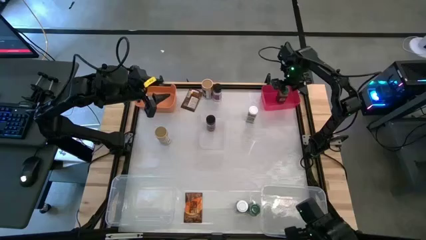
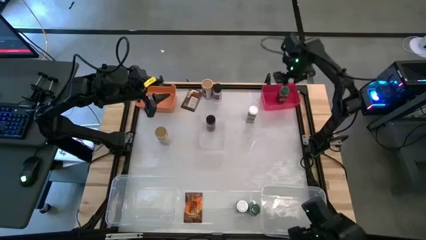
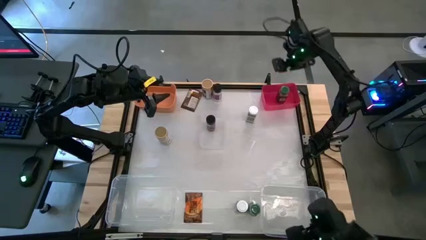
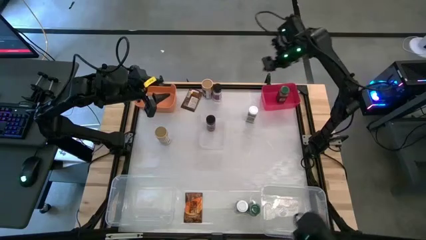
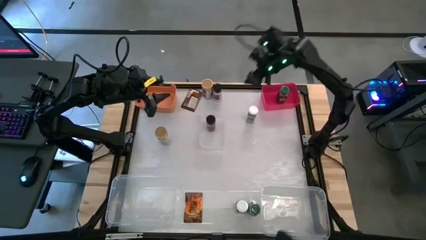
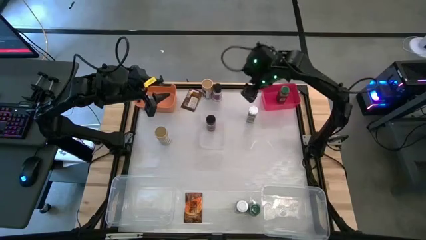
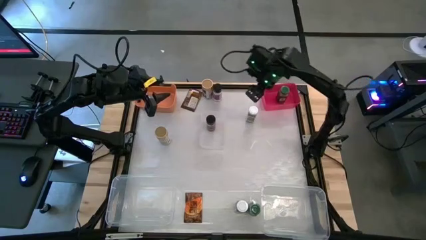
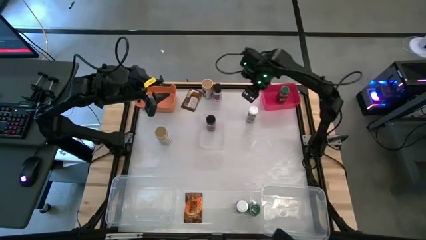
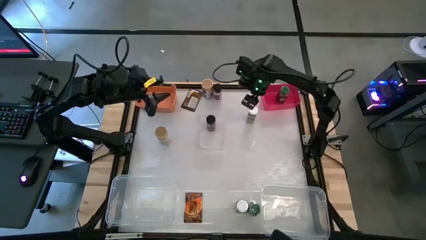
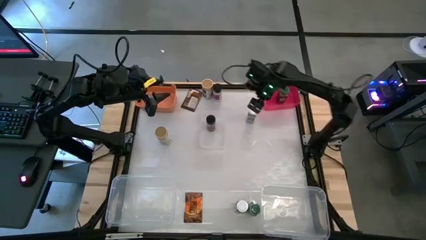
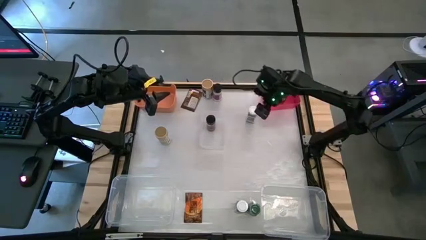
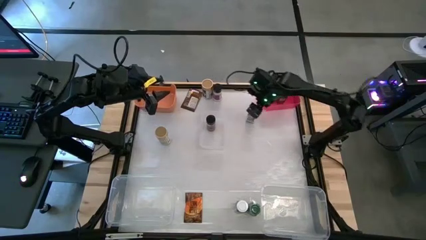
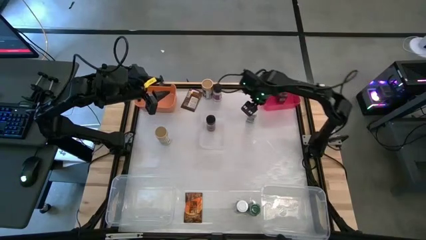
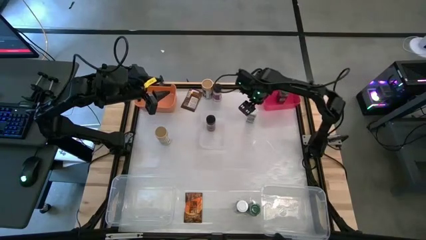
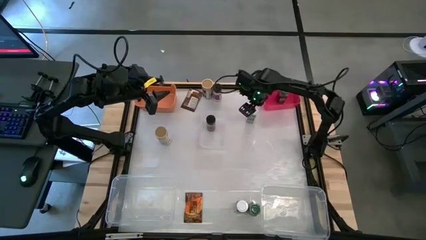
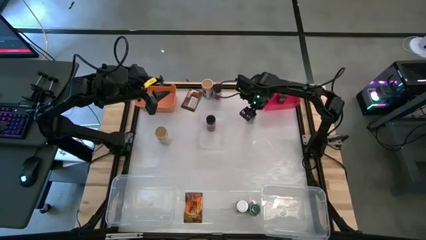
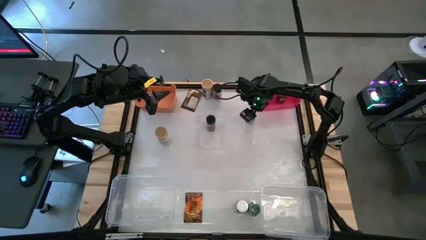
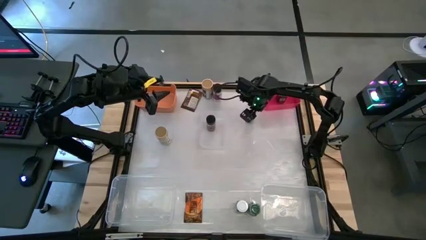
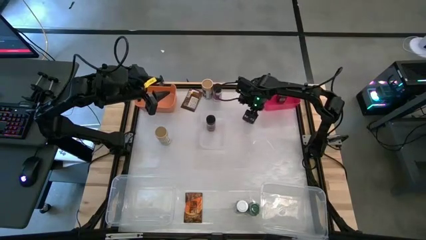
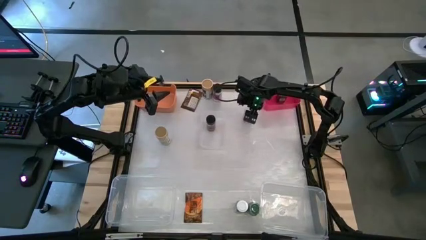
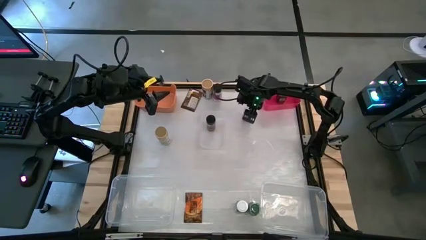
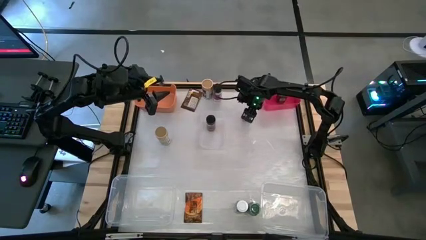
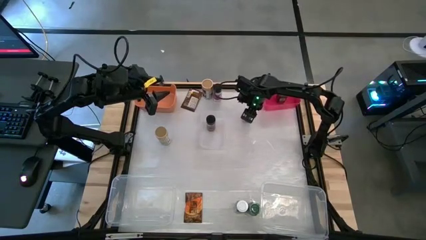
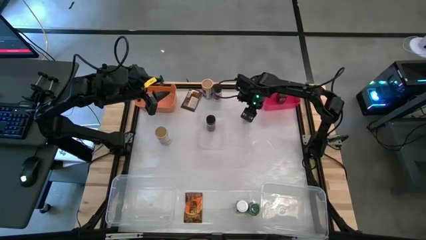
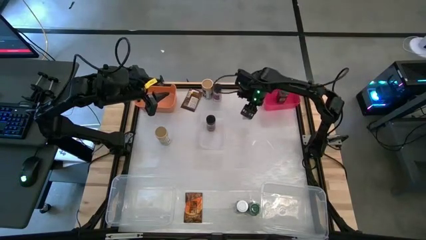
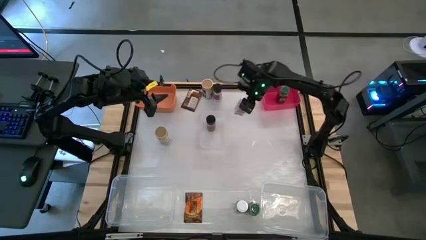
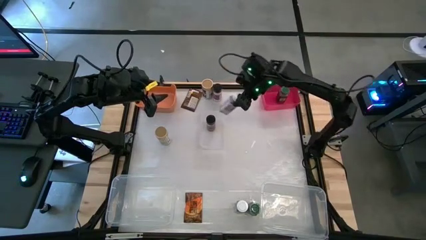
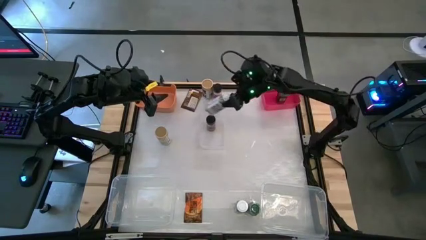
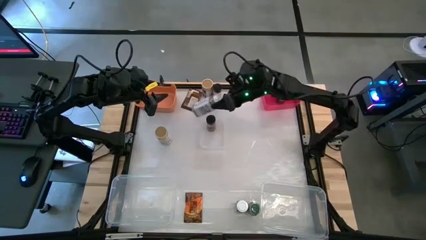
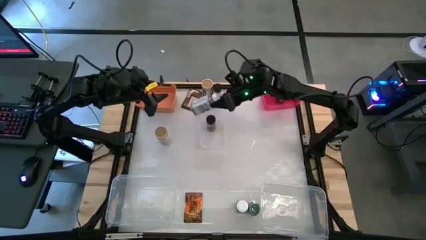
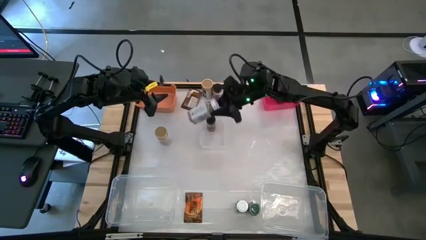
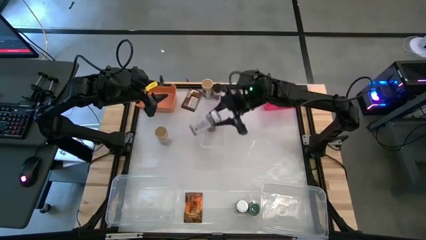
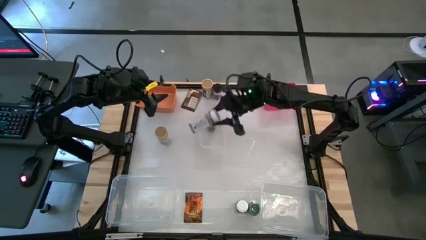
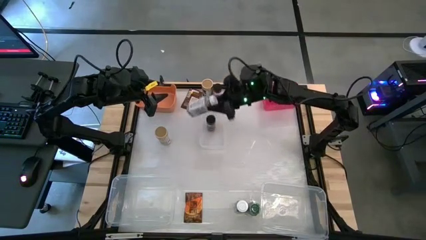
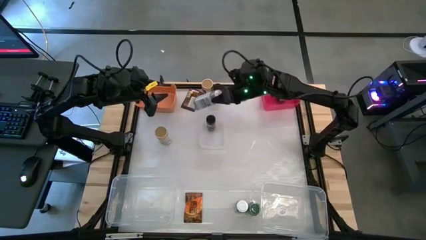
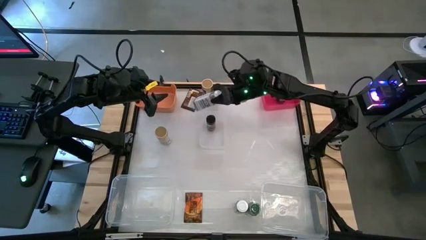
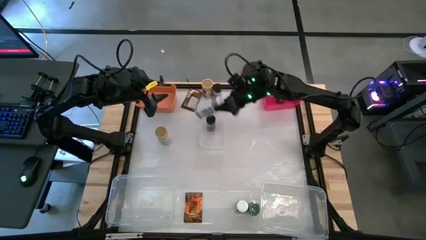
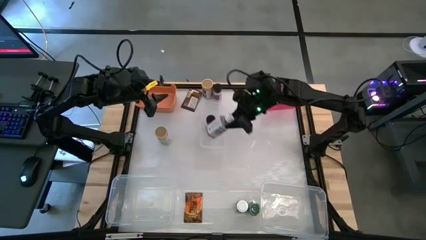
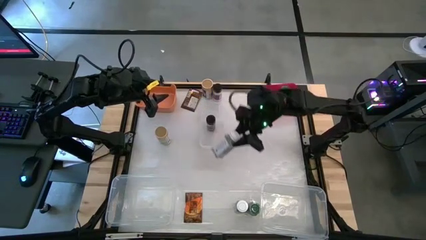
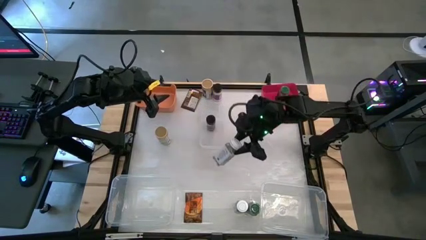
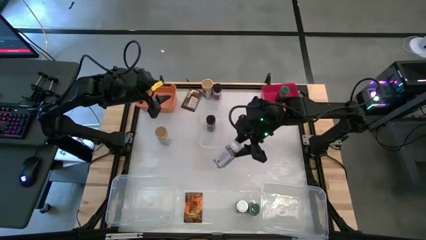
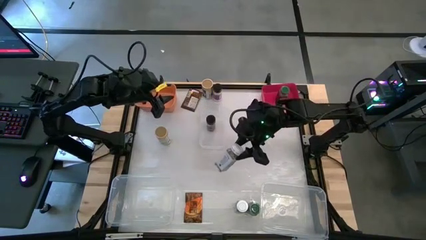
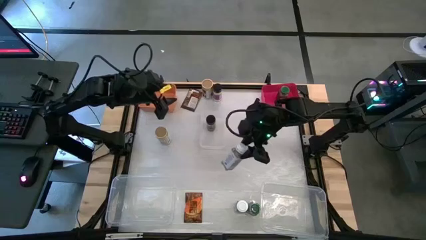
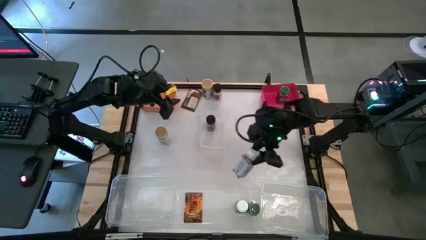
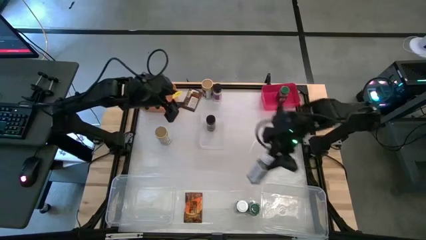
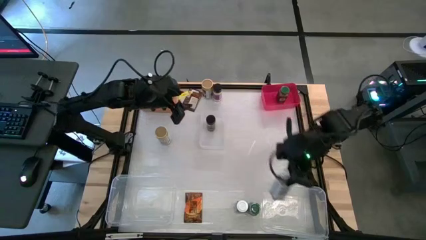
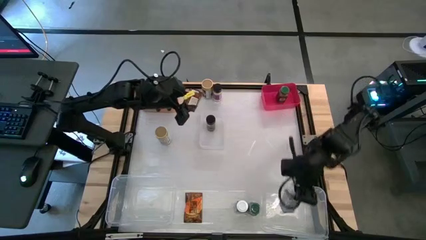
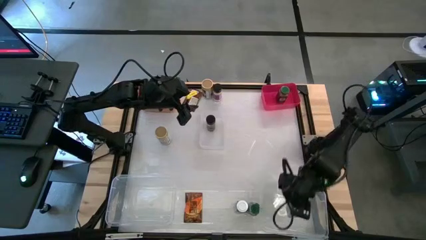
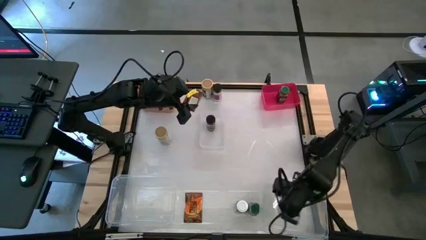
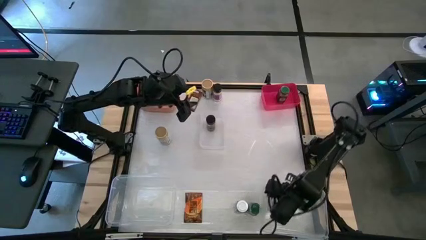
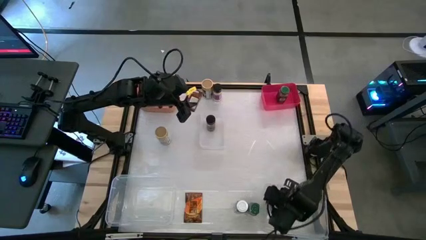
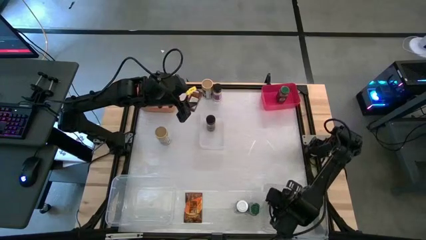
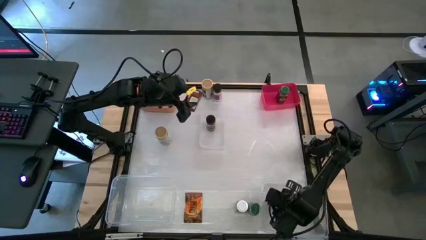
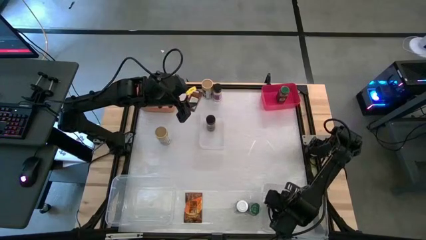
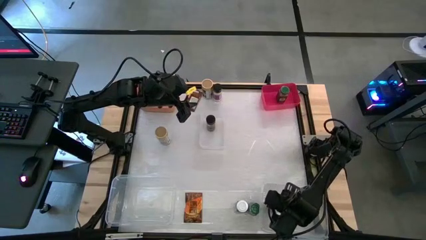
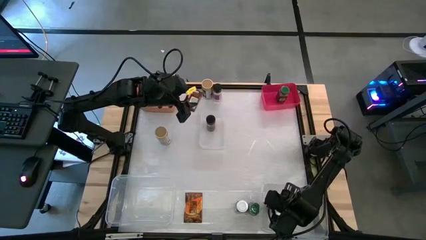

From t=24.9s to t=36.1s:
Task: Sort spices by type
Put the top white seasoning bottle into the right transparent bin

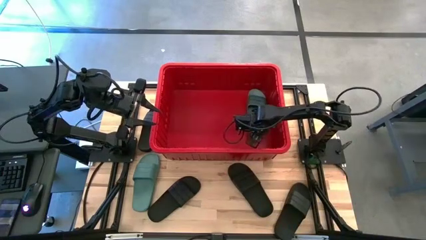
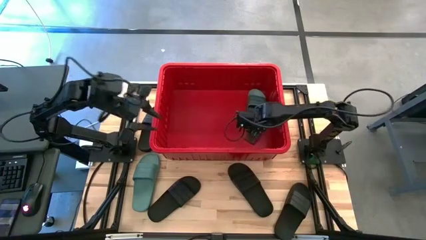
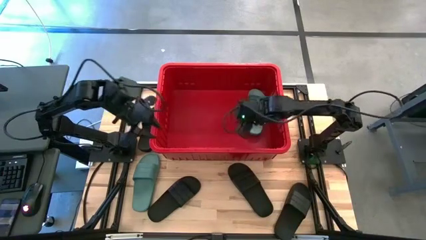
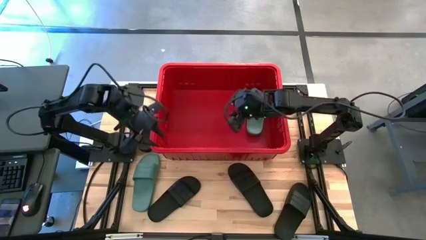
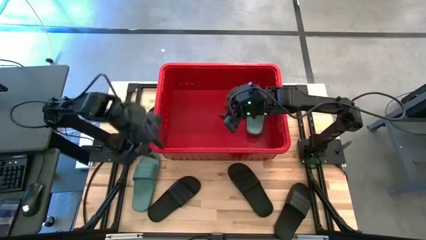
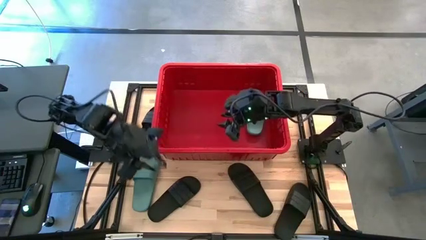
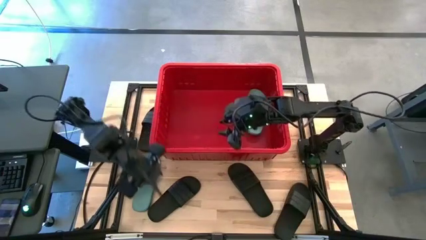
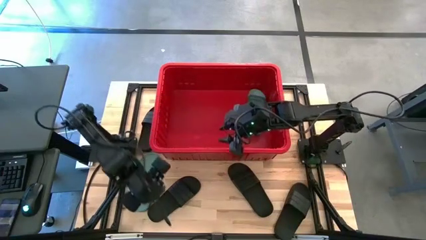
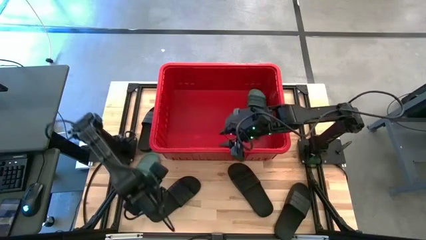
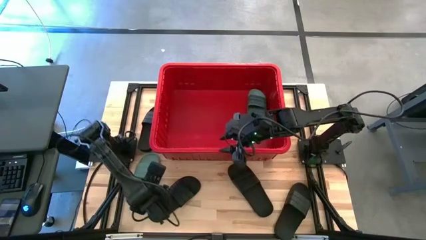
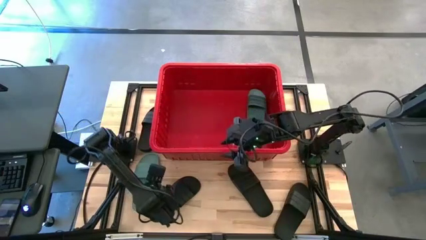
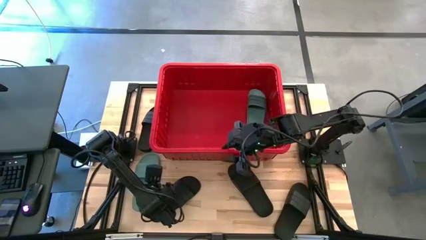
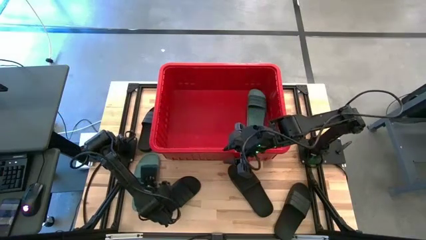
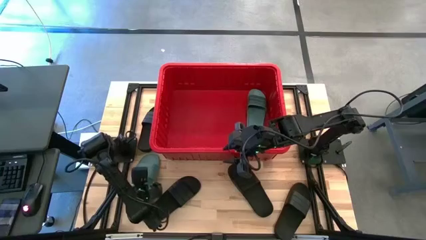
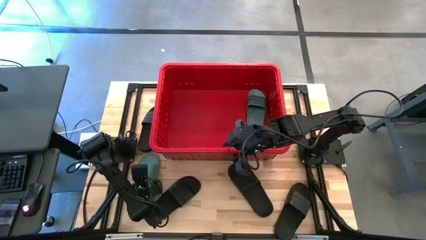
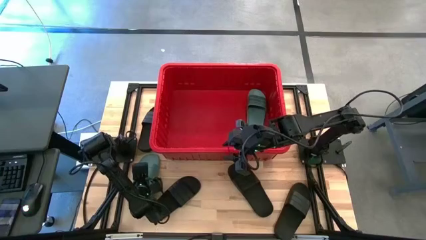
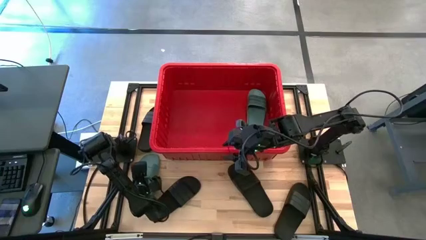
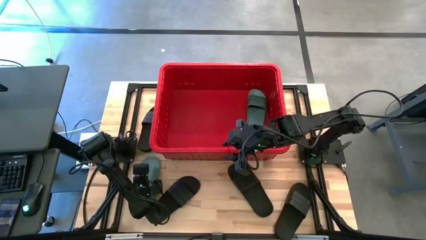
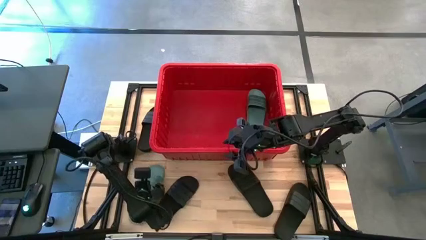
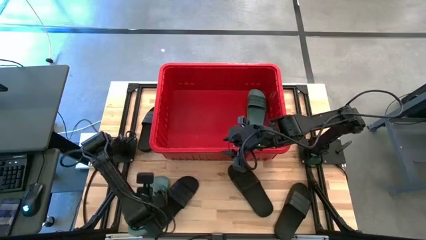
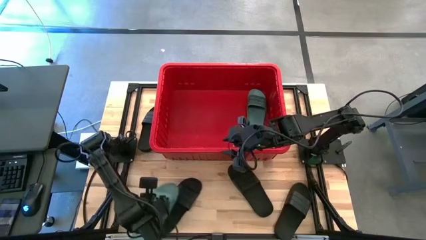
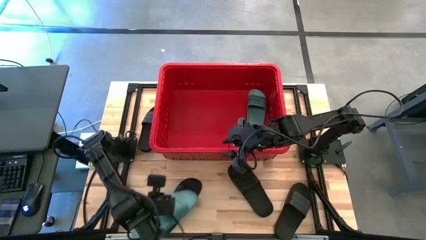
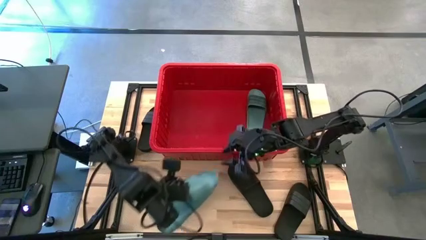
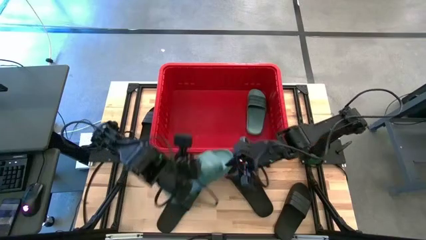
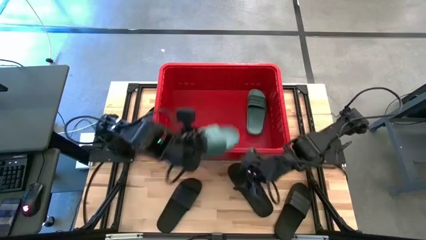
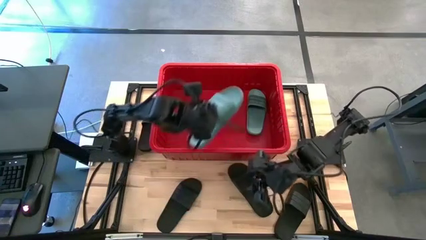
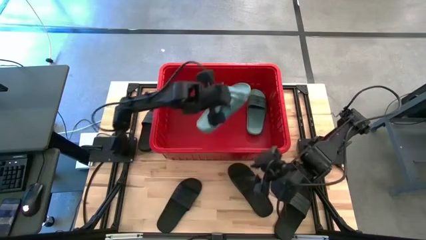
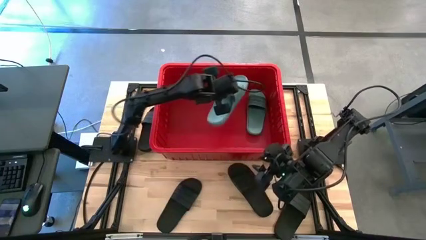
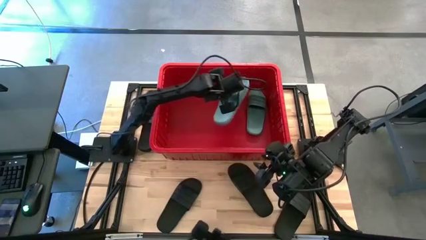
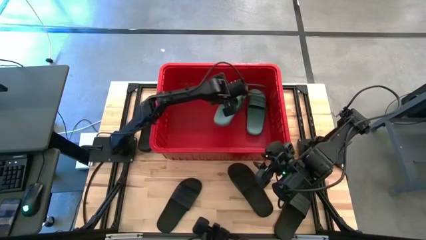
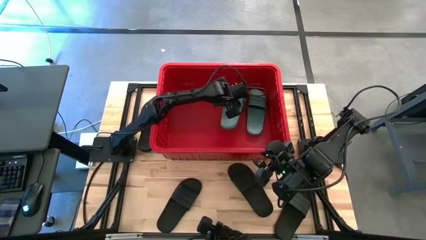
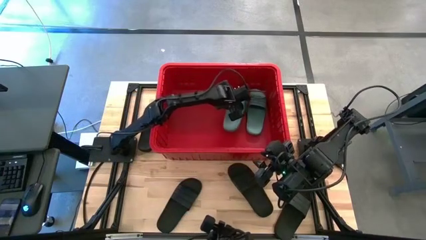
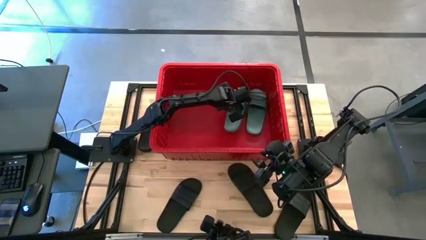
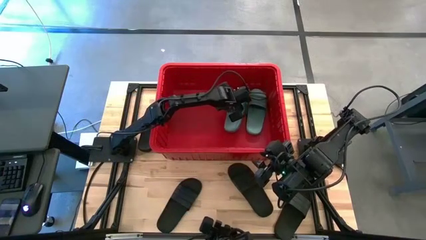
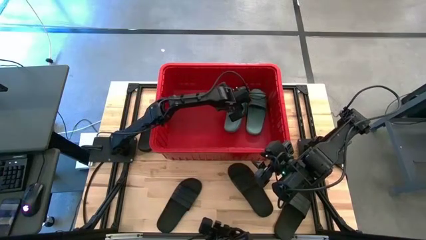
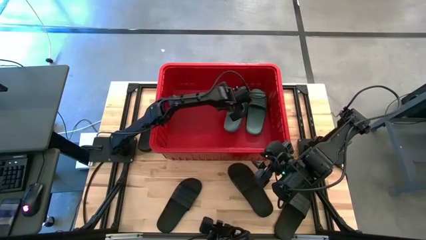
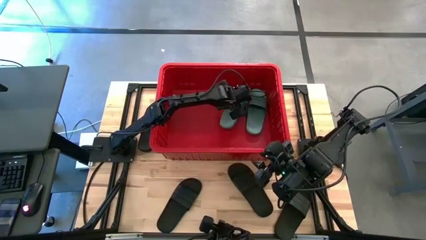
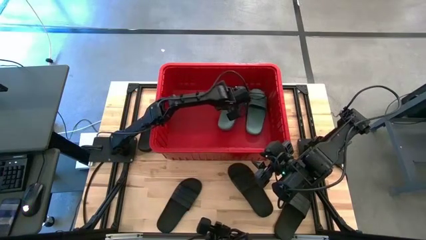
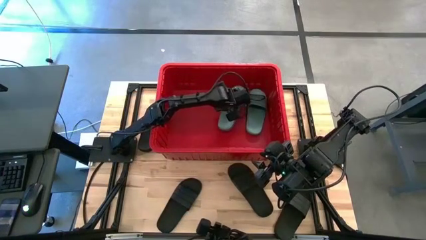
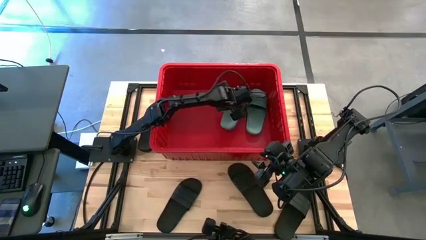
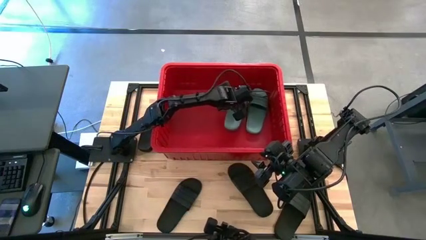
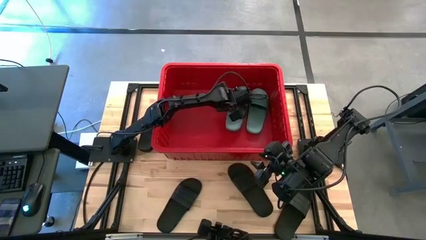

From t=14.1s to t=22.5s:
Task: Pick and place slides into bin
Put the green slide into the red container
